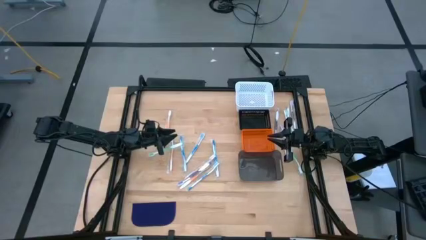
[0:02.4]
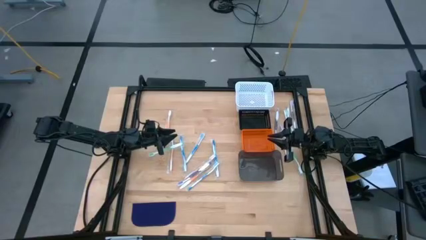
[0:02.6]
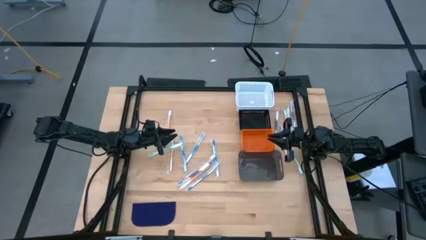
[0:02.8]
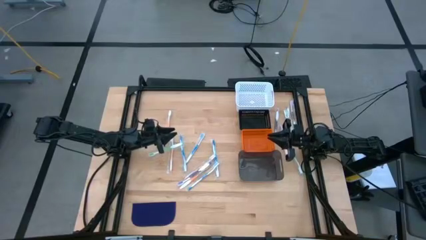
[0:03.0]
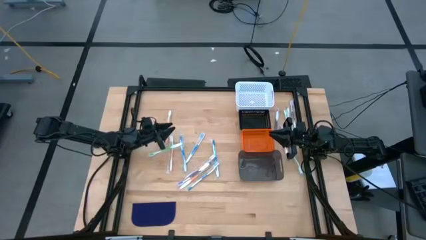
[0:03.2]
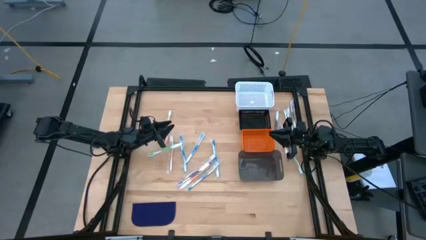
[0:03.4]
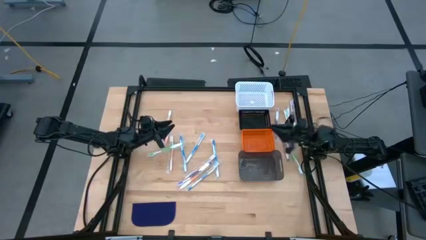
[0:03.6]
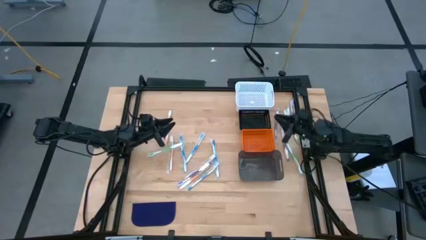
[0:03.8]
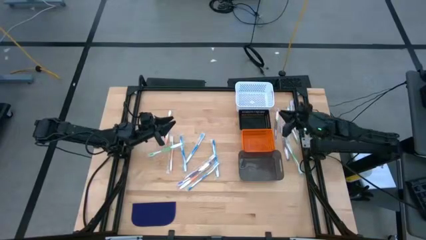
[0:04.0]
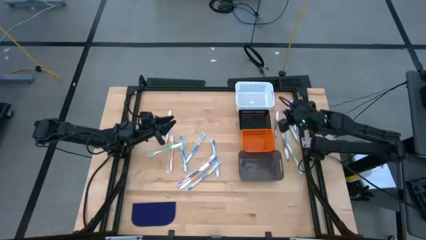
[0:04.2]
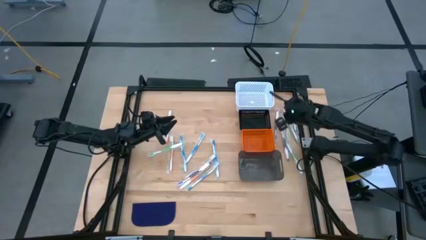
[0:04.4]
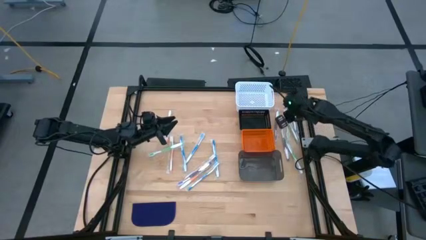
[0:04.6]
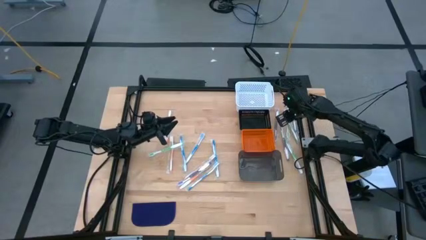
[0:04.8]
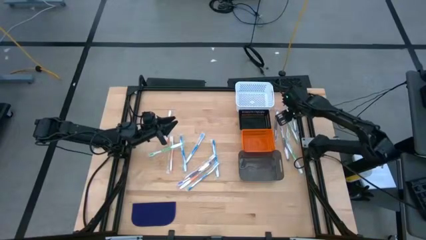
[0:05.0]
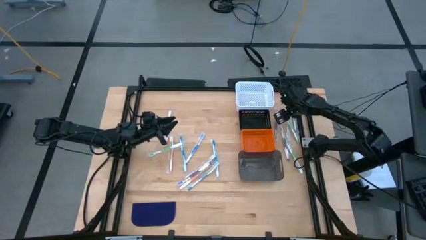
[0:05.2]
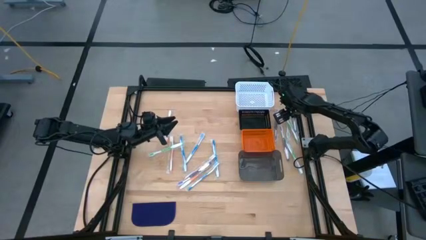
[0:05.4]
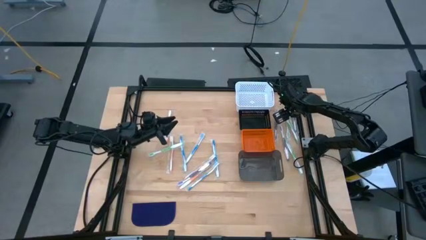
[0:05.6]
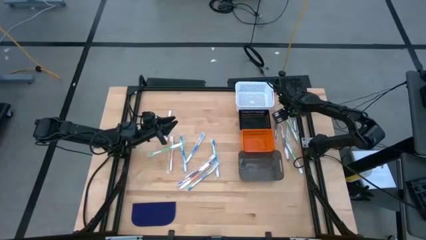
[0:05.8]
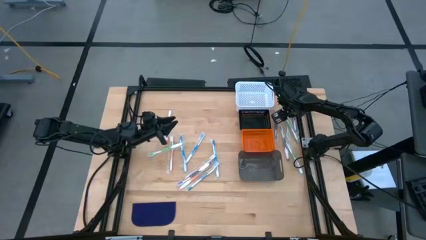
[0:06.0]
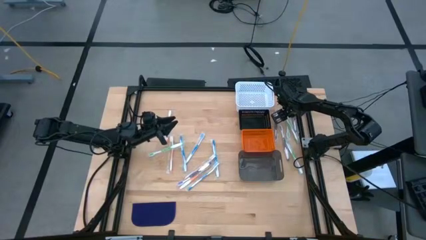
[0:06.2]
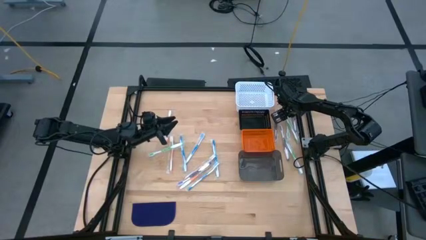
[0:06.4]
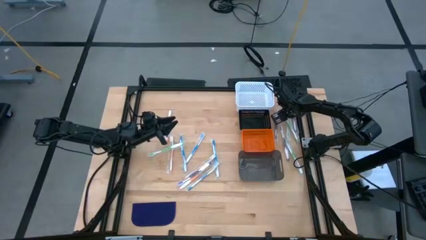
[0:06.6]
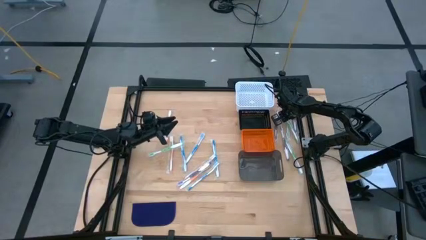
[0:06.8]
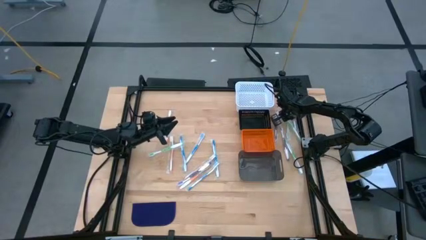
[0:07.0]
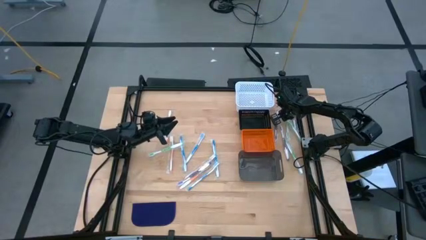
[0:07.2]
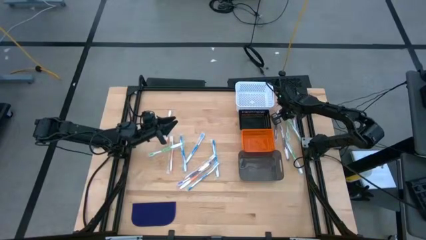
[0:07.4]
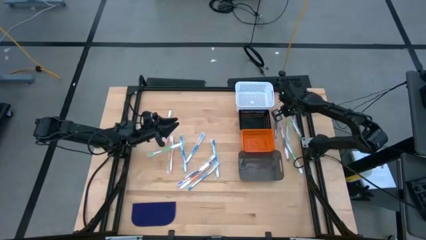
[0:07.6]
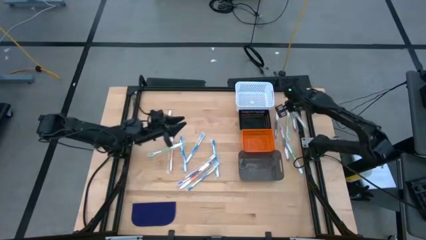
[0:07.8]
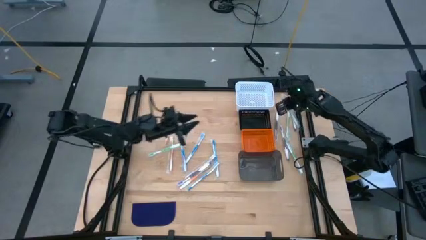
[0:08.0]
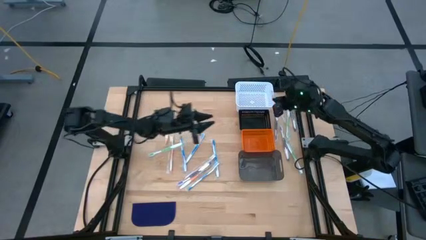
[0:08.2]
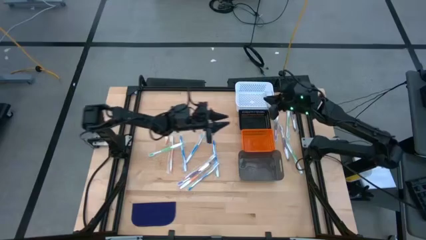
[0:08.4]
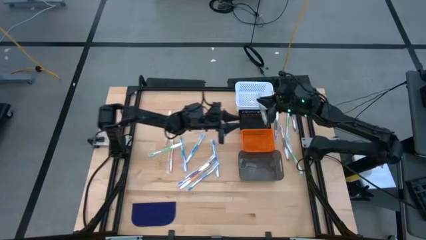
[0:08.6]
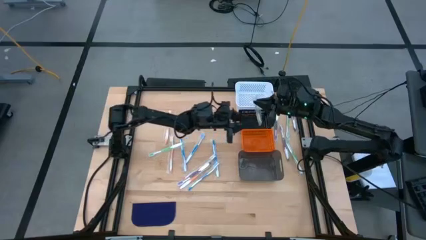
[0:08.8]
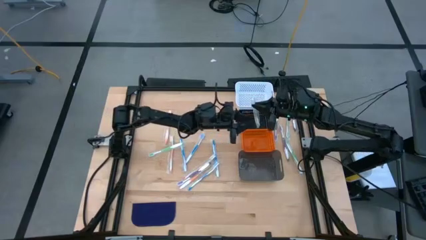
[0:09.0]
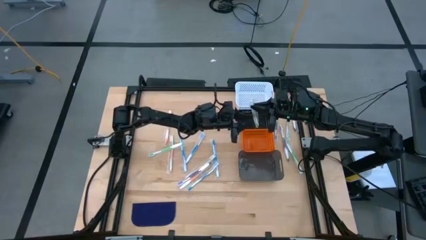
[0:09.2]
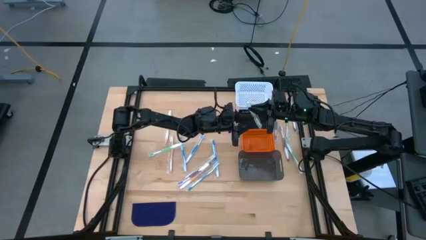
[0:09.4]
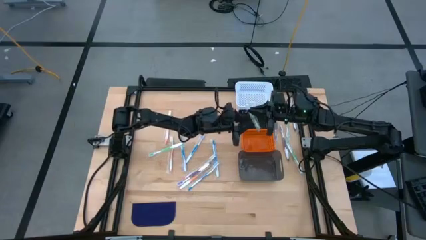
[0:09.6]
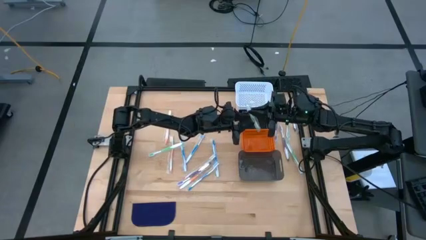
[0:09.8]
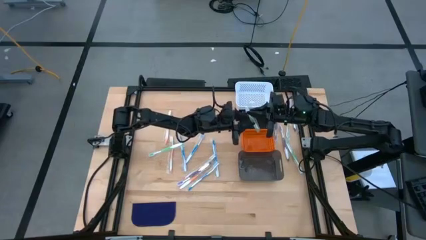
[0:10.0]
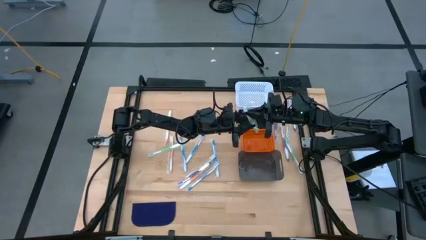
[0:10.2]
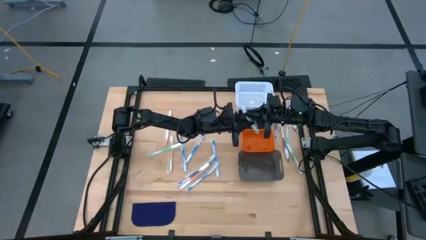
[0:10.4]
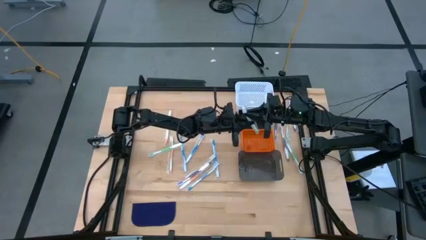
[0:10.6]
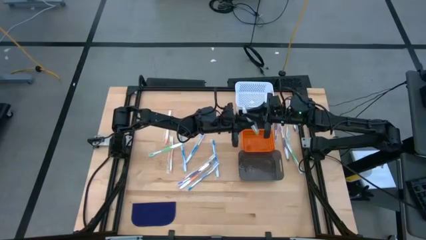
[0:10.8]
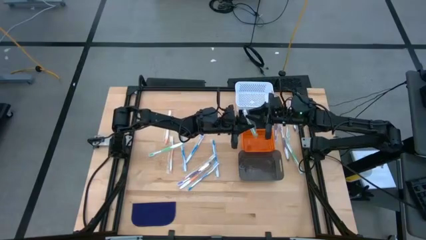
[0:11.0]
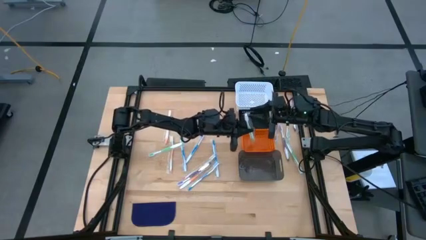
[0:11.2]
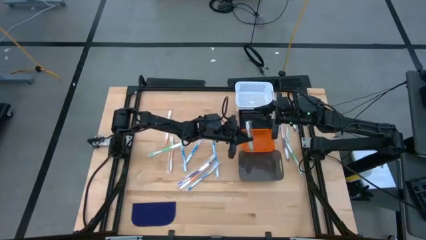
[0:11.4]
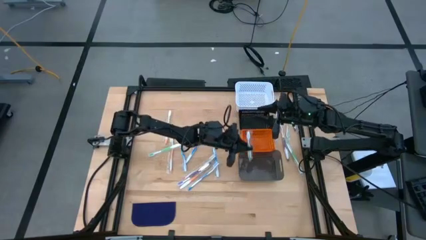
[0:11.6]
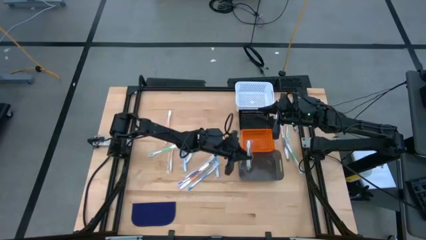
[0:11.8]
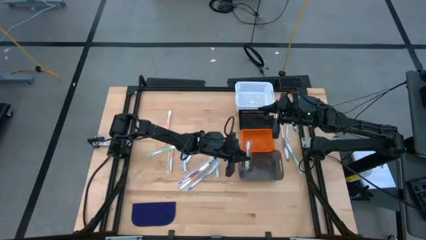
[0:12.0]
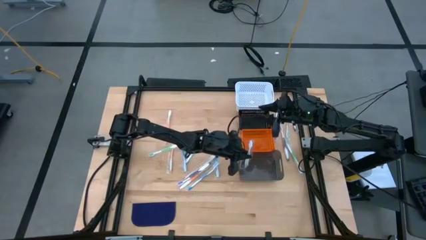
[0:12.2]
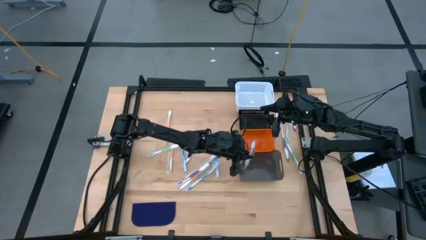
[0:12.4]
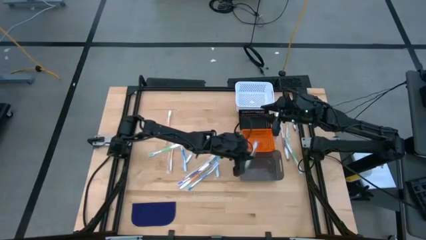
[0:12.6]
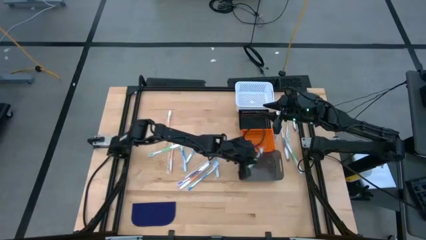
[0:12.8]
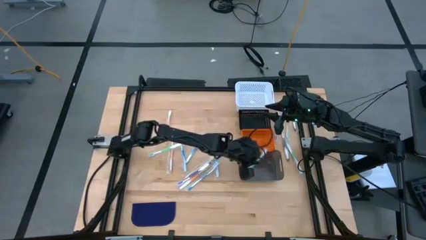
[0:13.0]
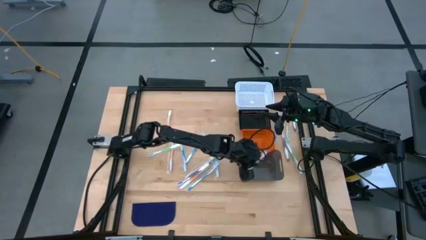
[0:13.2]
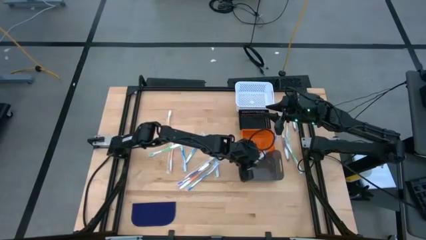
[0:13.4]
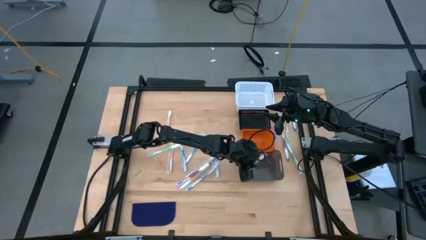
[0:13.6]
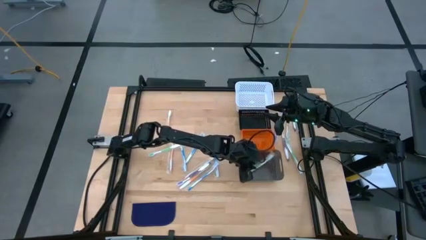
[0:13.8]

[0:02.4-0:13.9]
Task: Pick & Place Toothbrushes
Put the green toothbrush into the gray bin
